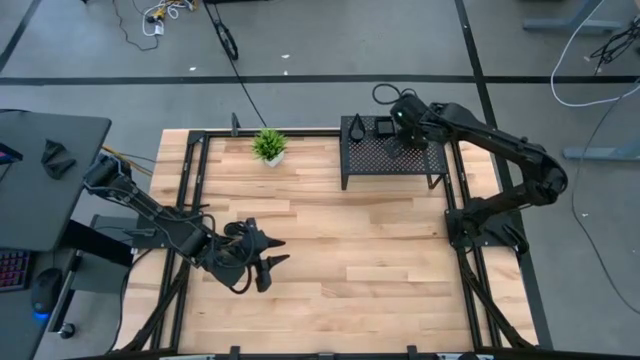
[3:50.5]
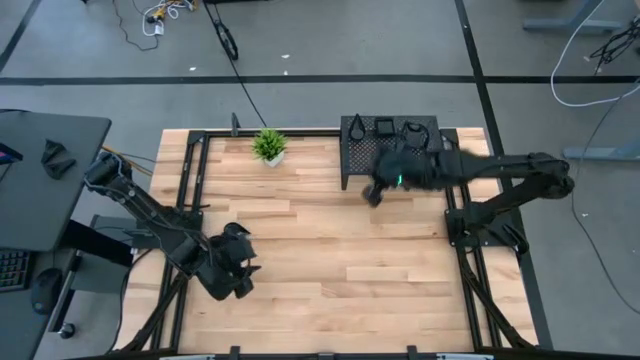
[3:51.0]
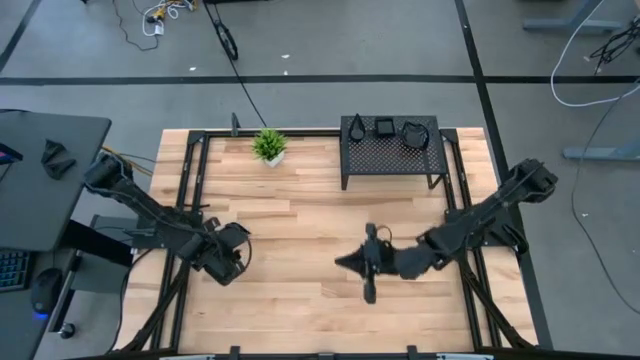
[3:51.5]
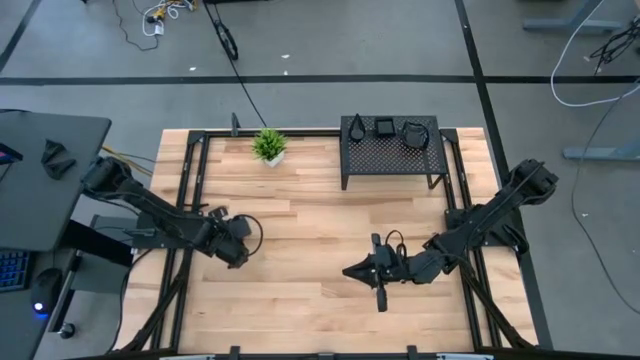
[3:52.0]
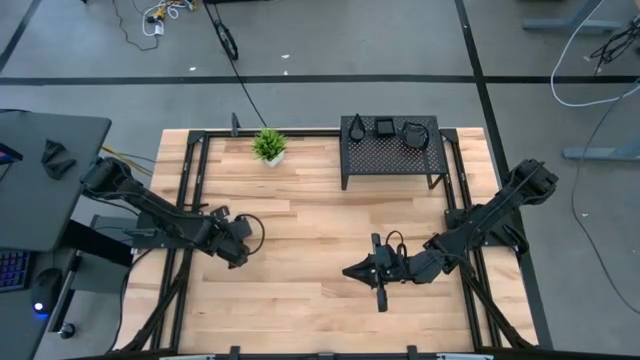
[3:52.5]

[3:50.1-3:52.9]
Task: Pick & Place Mini shaped plates
Stack the black drop-shaped plate on top of the black drop-shaped plate on the shelf

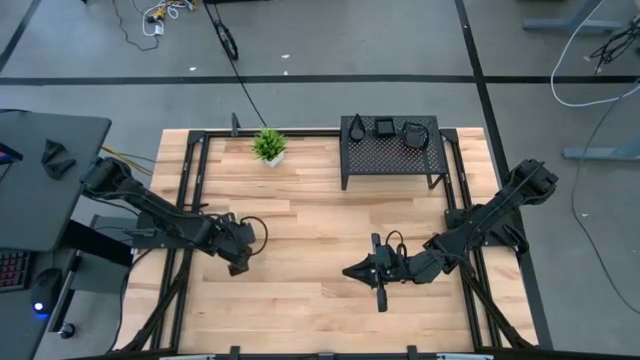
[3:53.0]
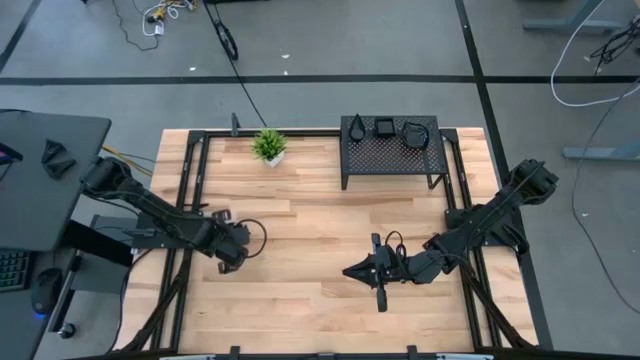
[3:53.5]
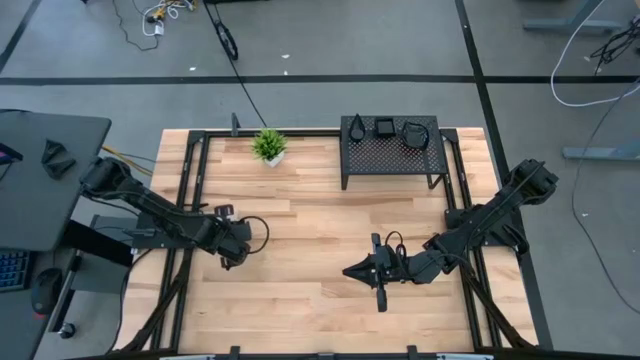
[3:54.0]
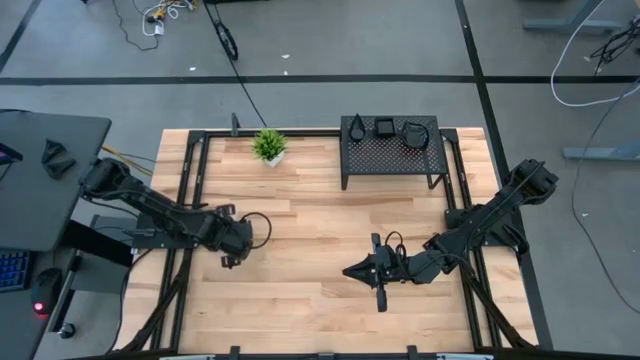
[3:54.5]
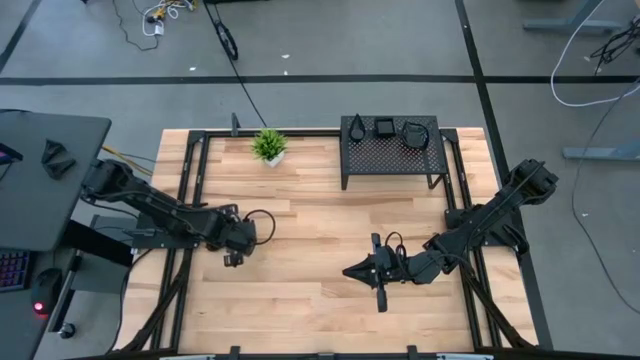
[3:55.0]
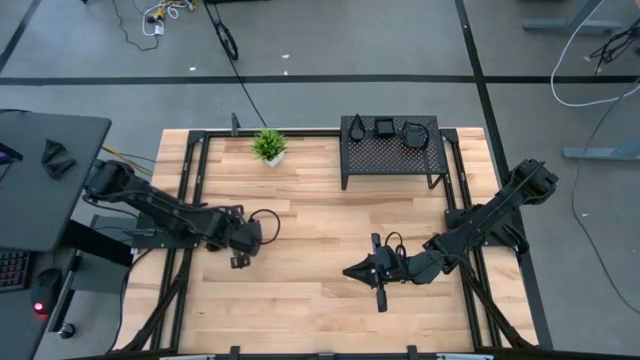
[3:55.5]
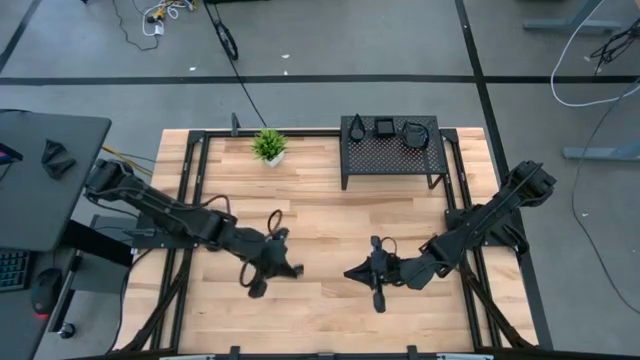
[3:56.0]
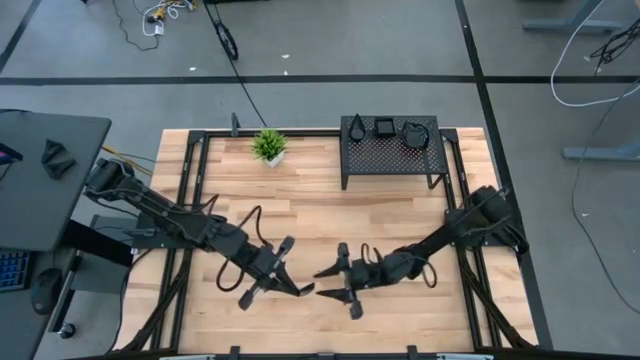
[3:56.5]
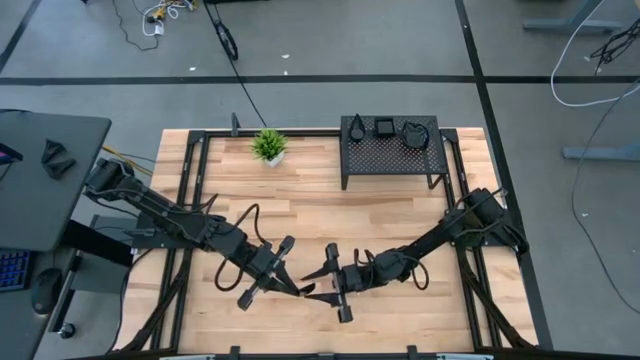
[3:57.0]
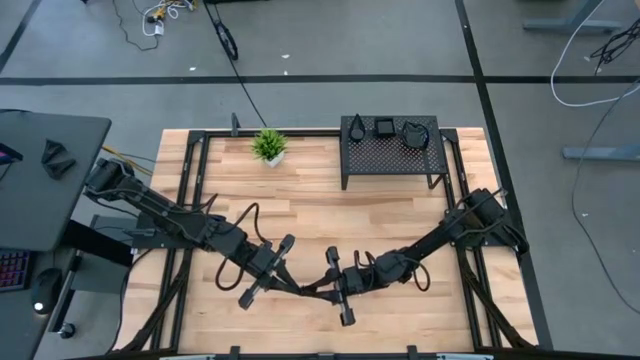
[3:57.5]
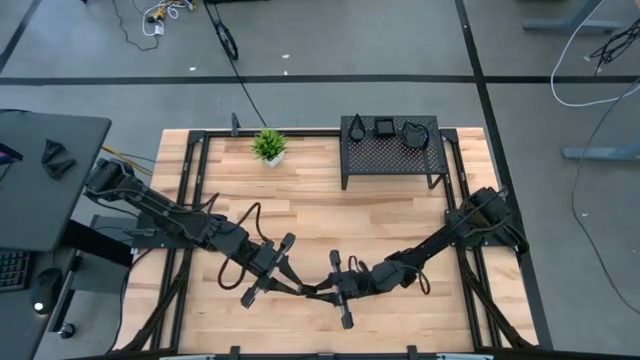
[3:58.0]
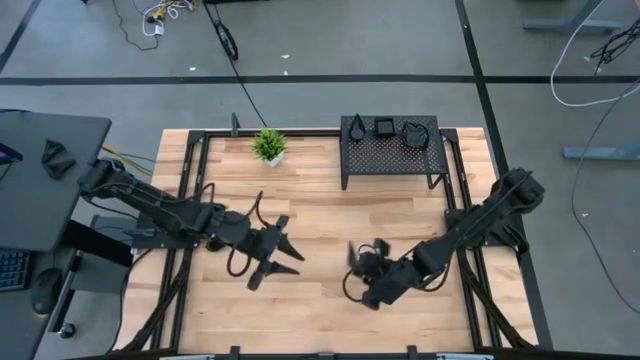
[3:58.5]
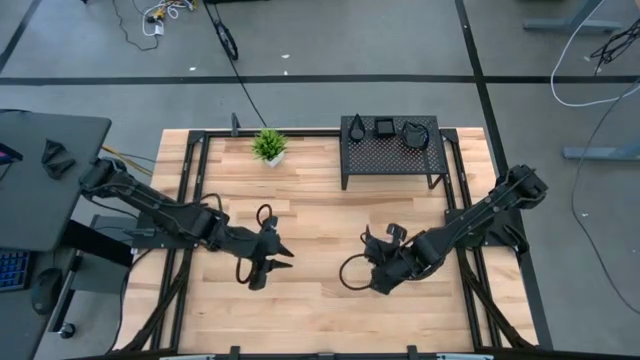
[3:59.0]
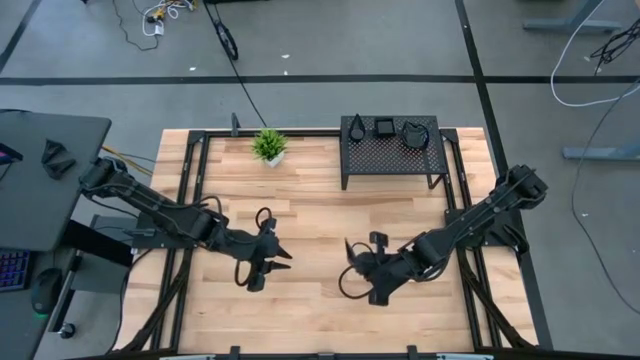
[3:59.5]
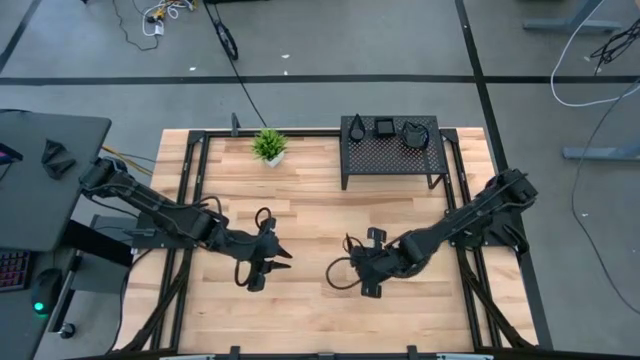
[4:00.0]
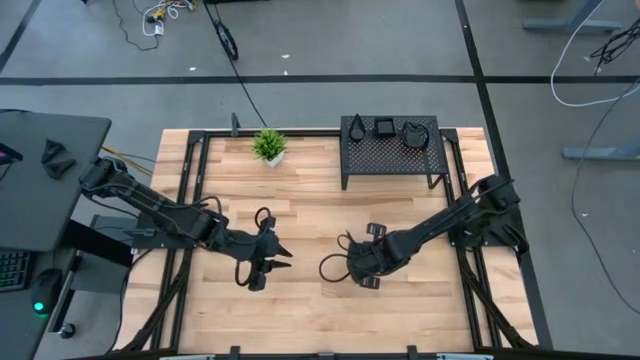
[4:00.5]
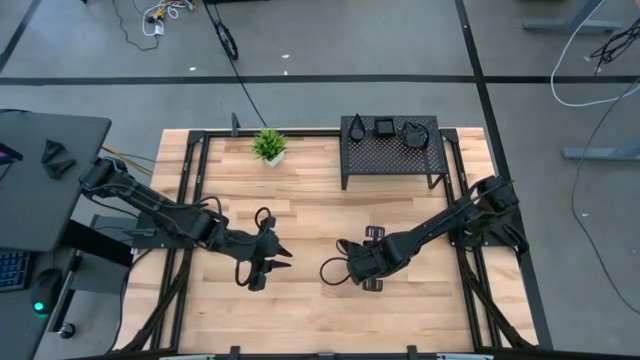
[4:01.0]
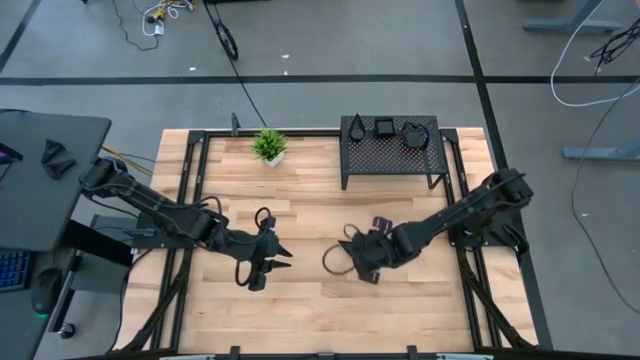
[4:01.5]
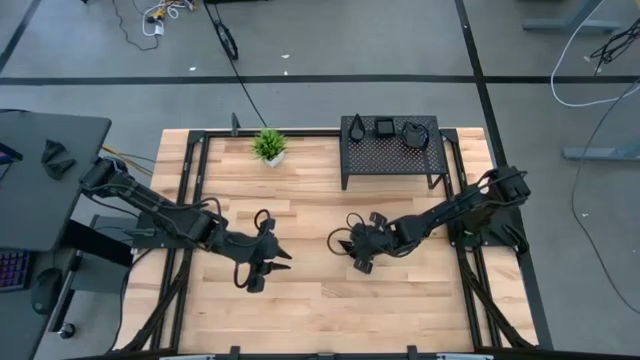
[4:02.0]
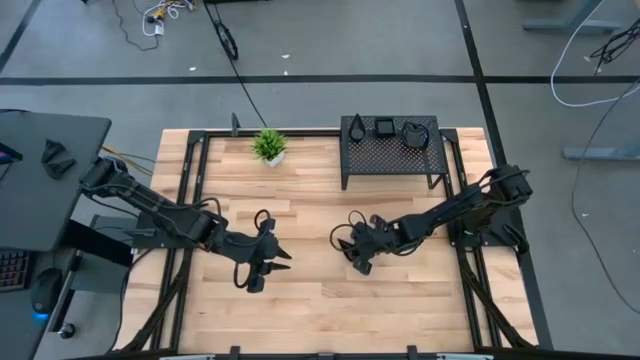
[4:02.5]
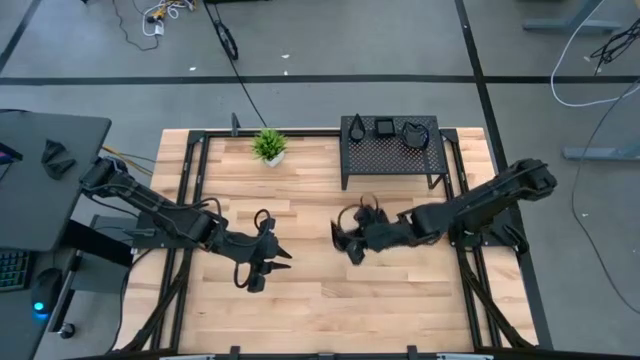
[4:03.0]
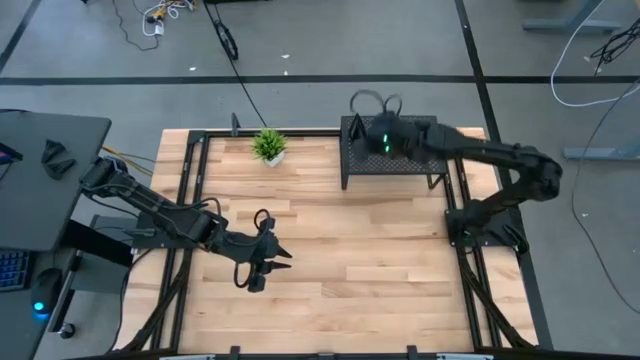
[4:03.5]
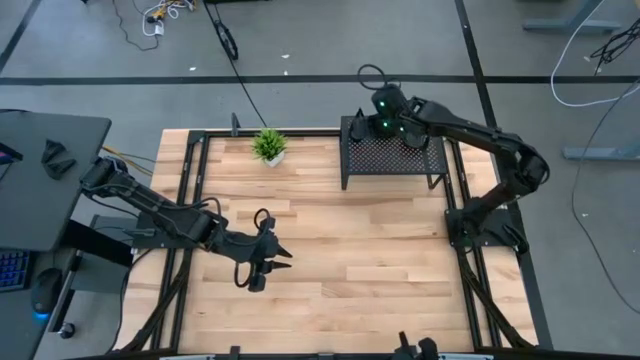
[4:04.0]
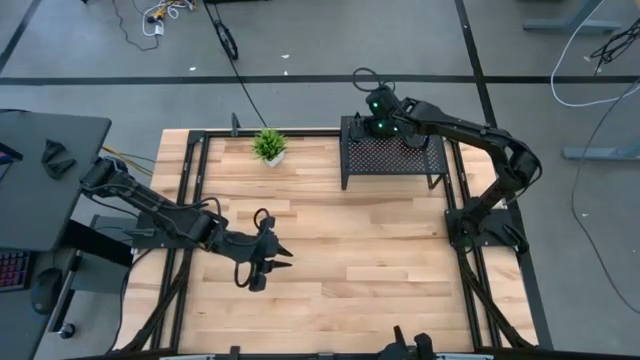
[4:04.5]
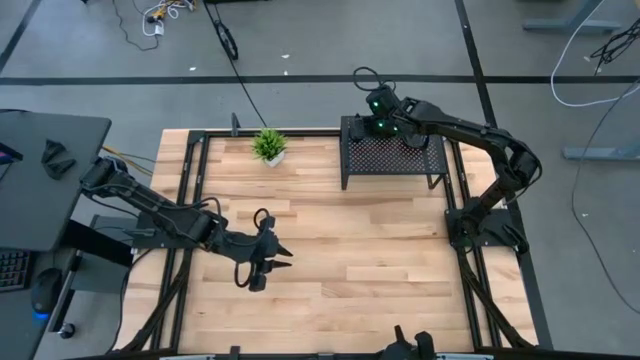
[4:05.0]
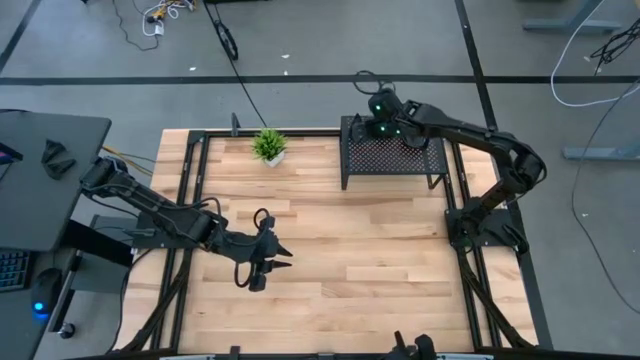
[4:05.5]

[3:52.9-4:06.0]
Stack the black drop-shaped plate on top of the black drop-shaped plate on the shelf

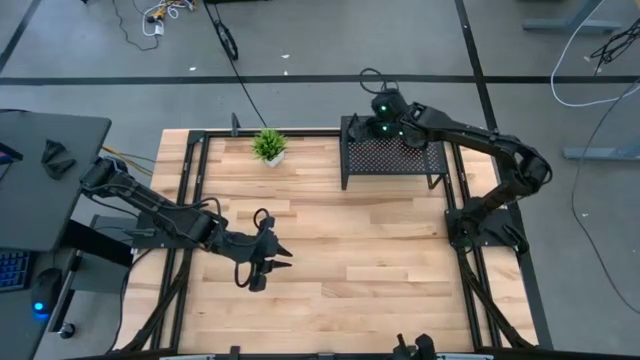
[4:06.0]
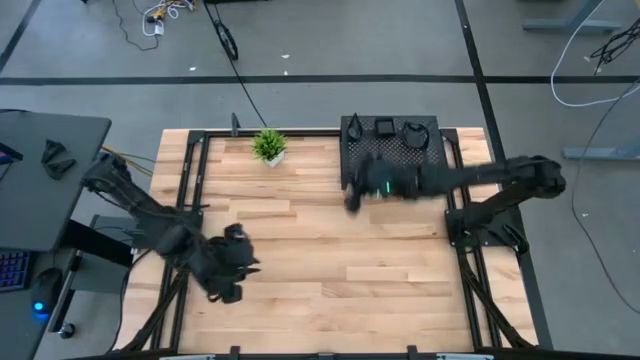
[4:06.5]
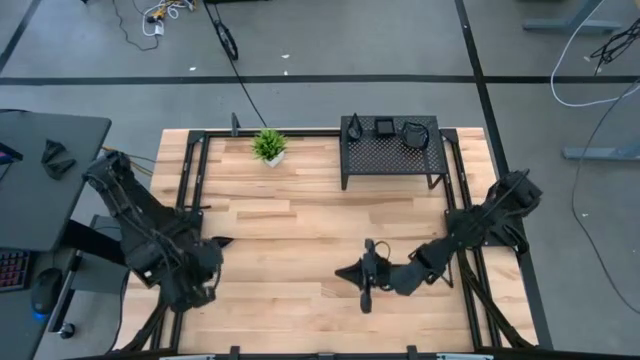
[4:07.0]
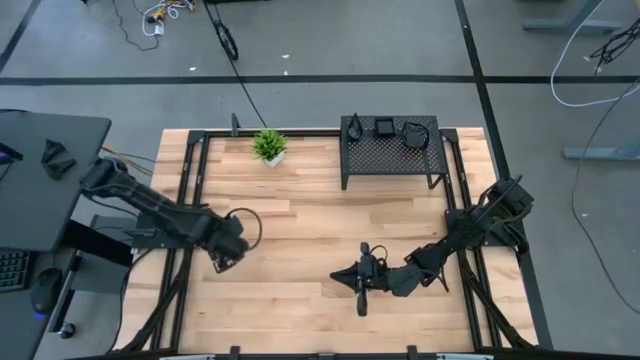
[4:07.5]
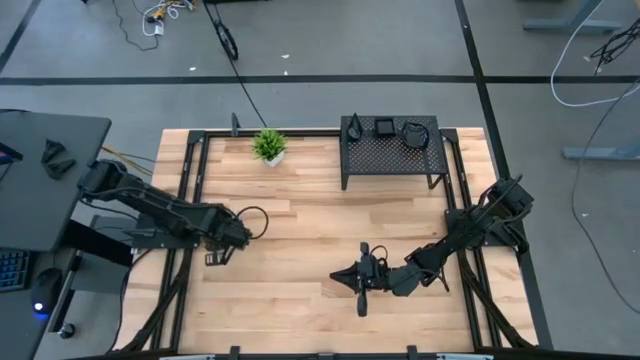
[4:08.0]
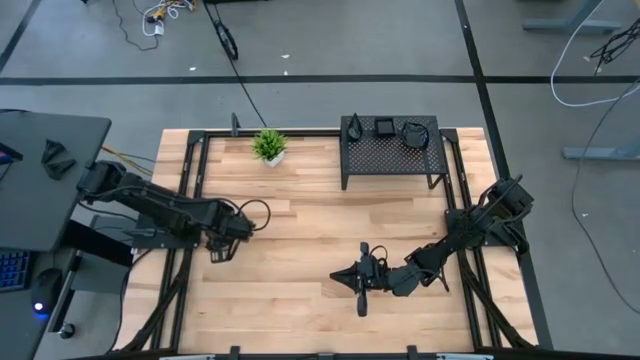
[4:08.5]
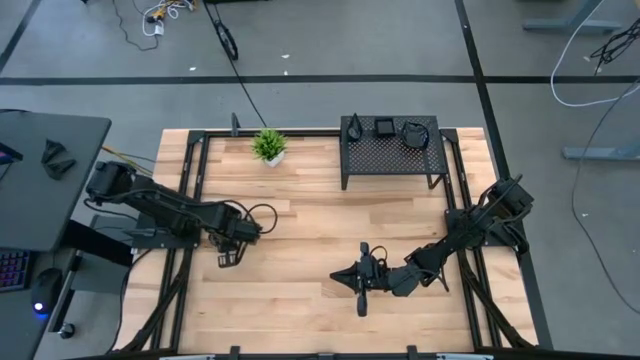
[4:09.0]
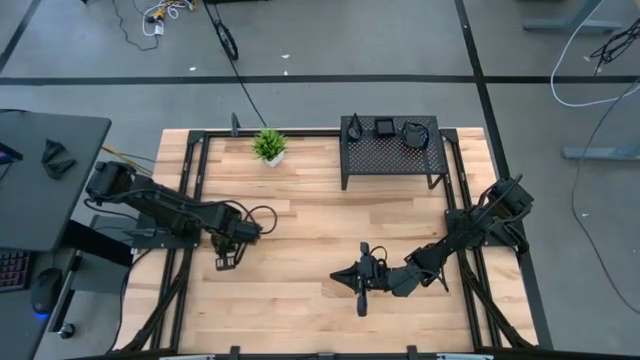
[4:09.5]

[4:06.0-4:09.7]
Stack the black drop-shaped plate on top of the black drop-shaped plate on the shelf

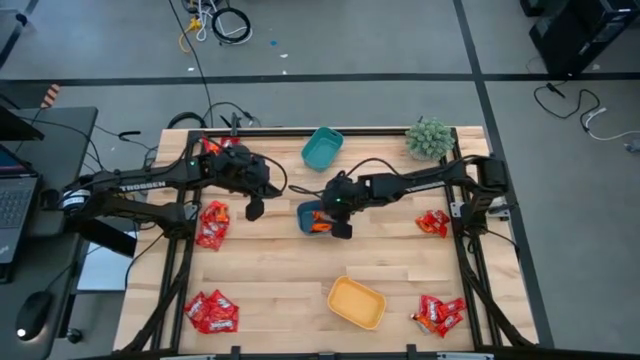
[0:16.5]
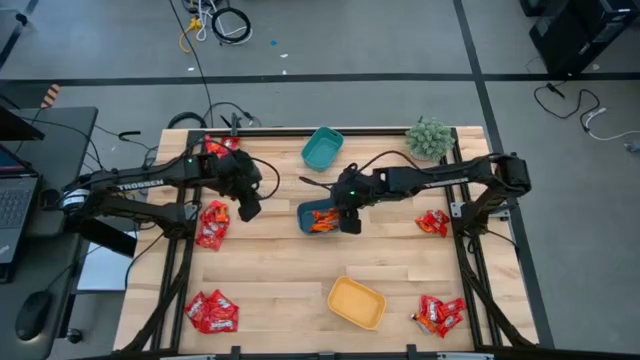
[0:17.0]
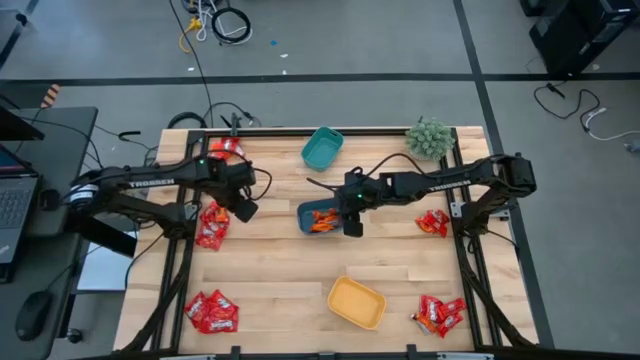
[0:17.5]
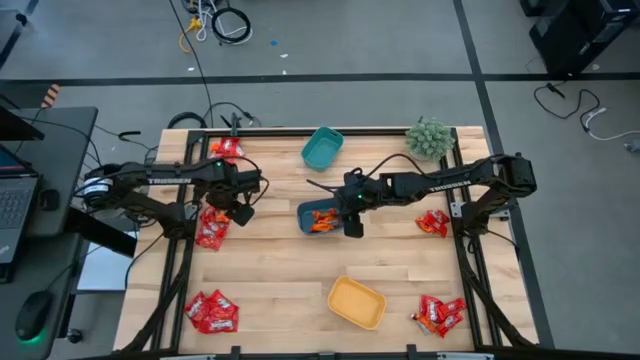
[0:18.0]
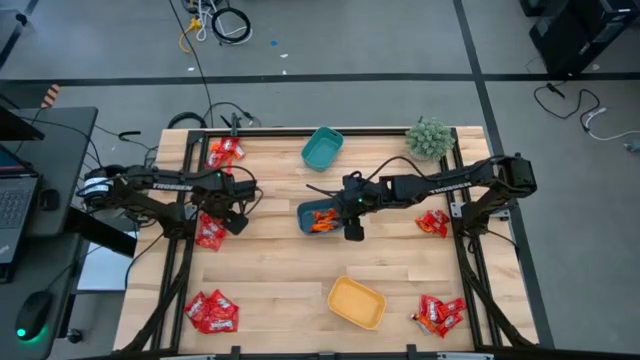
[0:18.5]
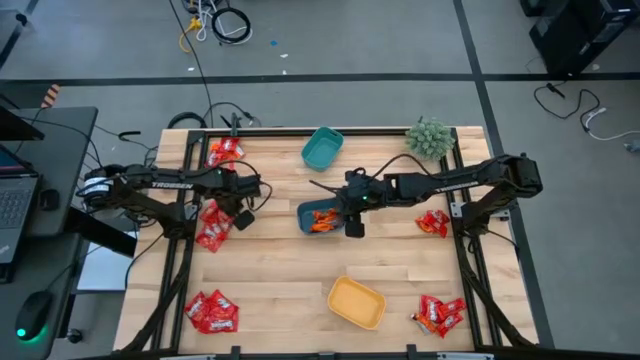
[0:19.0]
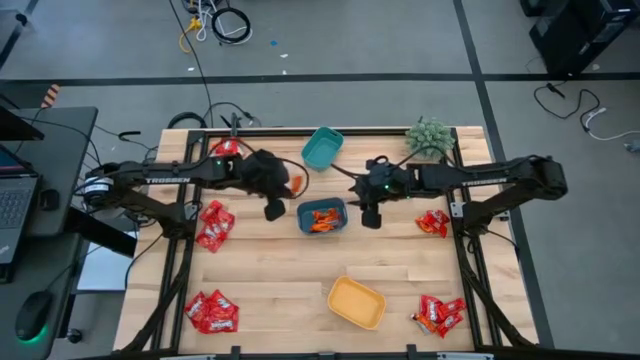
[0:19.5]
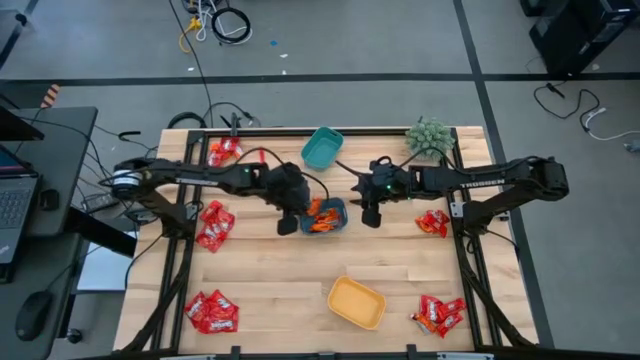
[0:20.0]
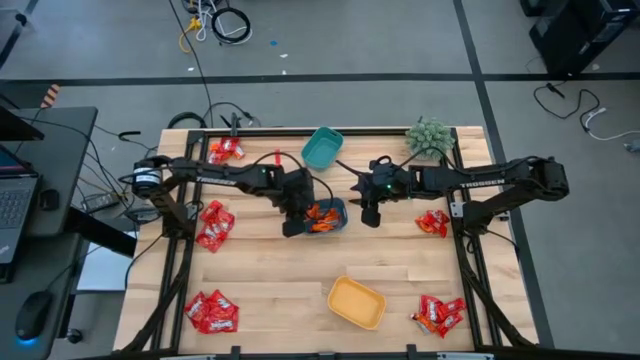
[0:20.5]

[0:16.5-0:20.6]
Task: Sort candy
Put the orange chocolate into the blue bin
